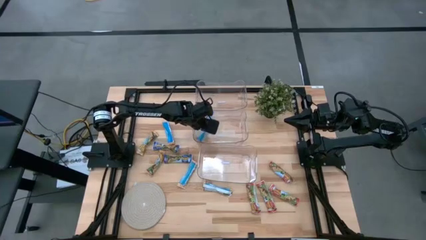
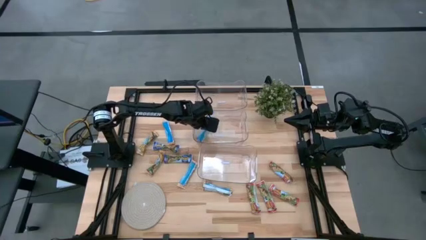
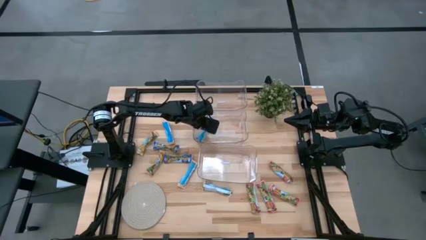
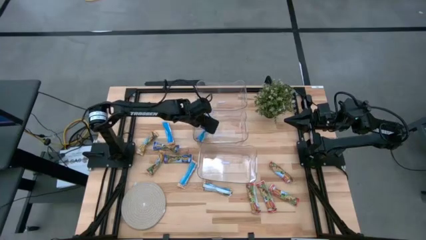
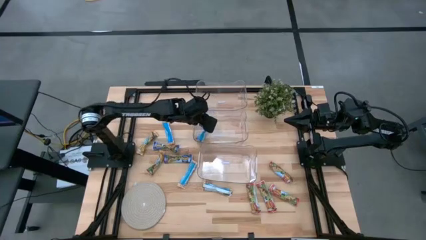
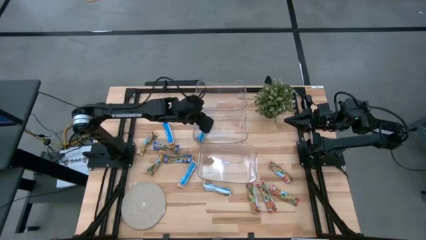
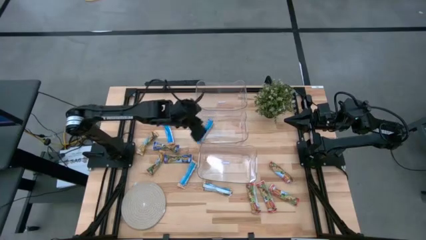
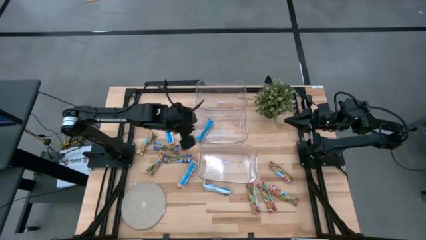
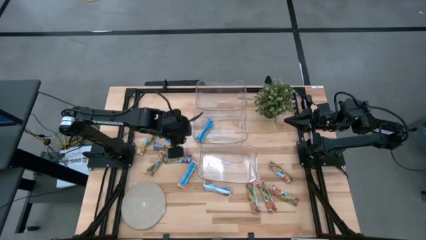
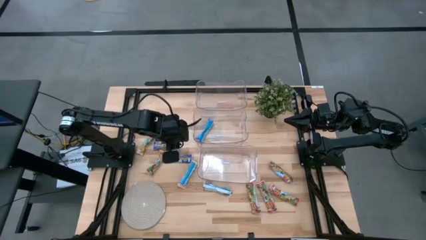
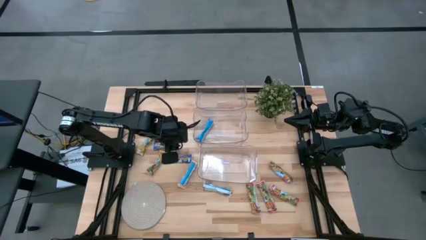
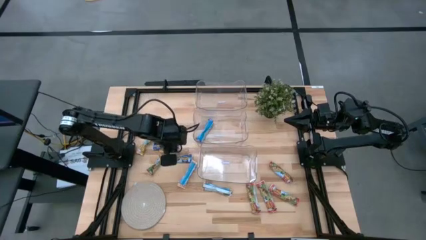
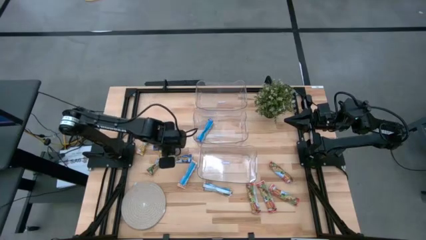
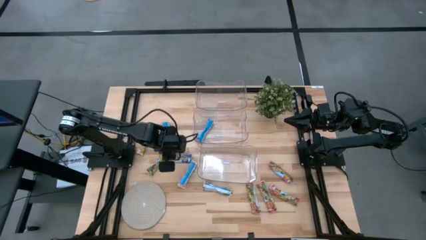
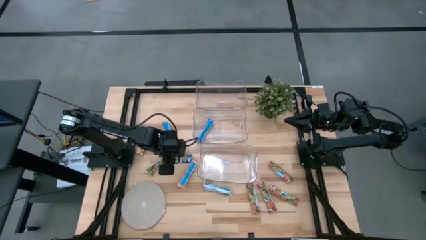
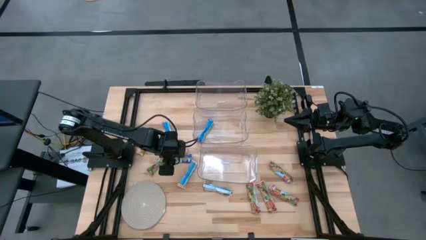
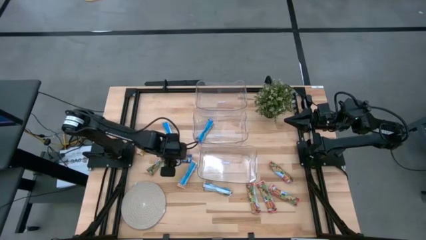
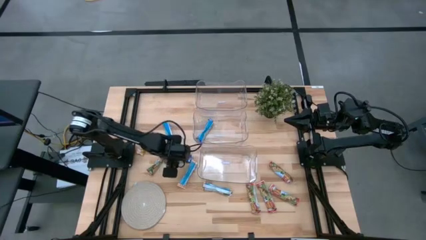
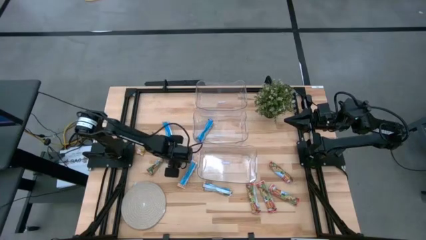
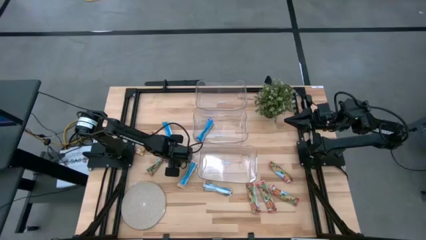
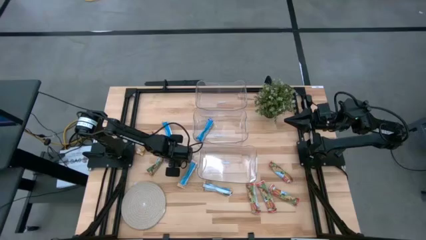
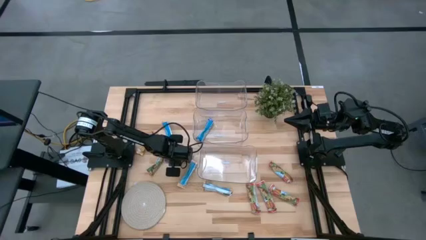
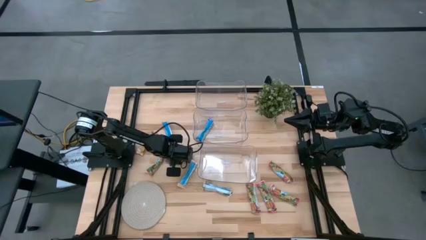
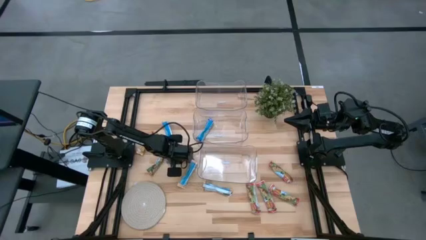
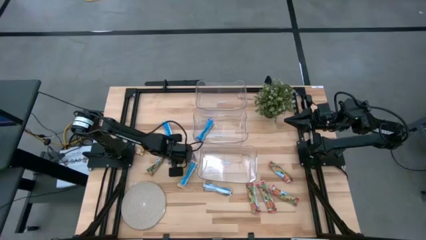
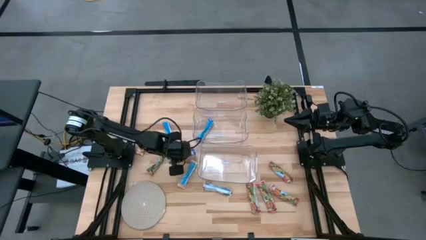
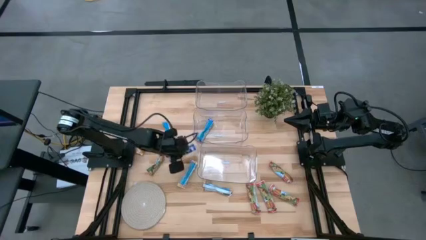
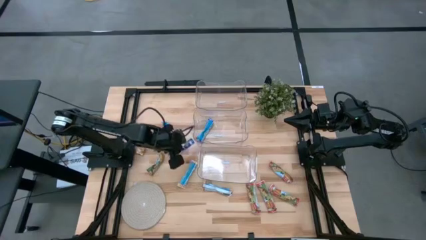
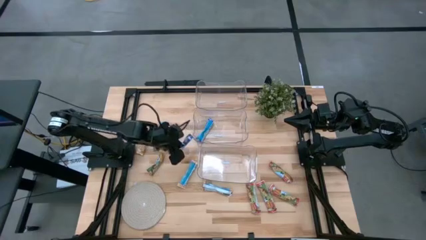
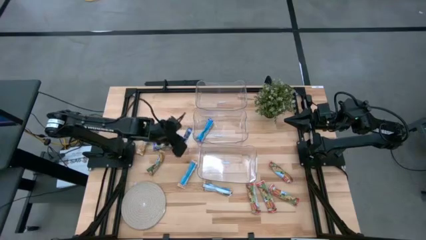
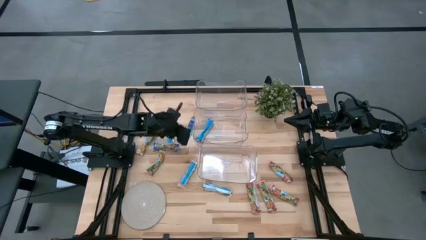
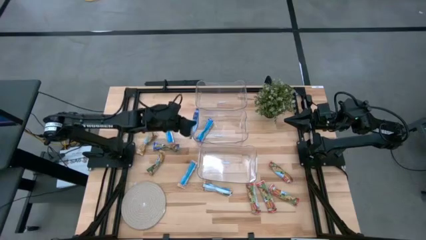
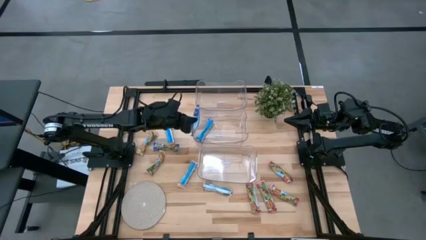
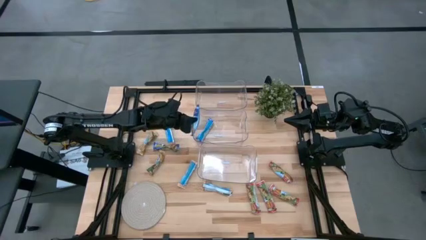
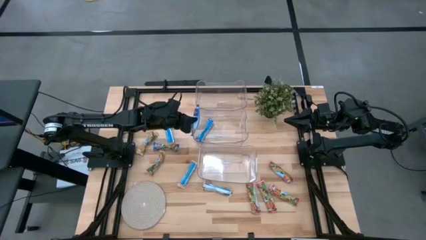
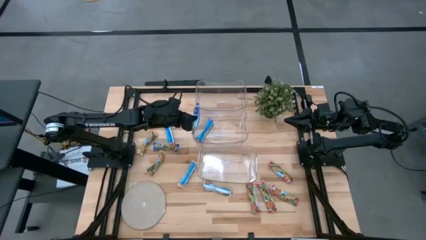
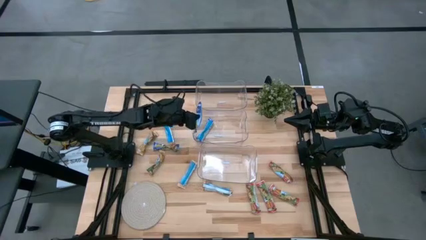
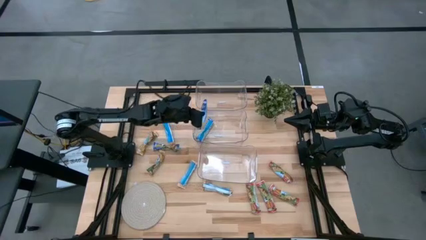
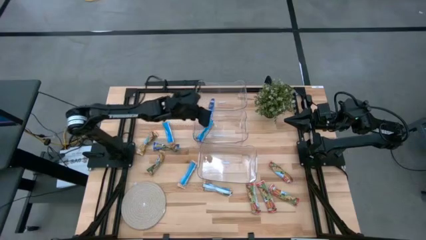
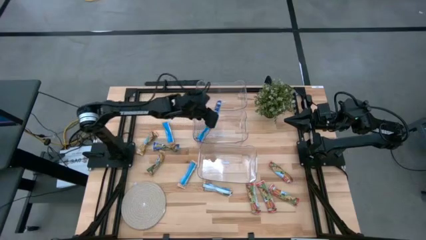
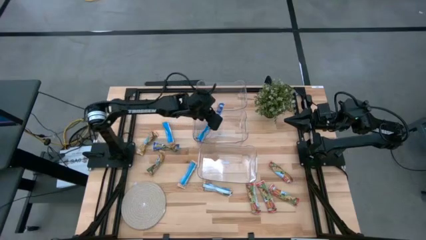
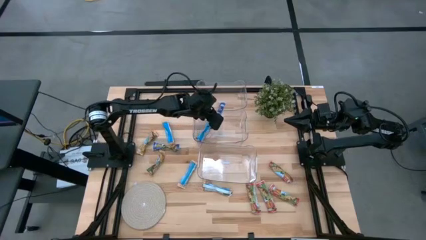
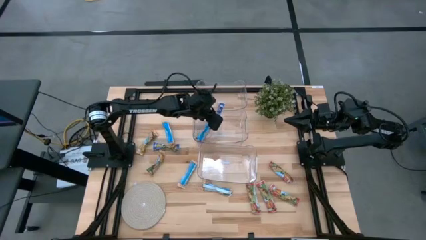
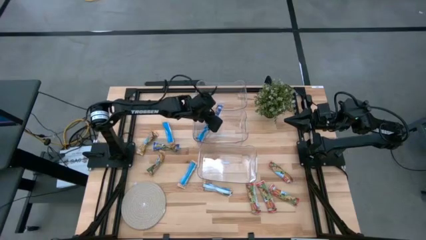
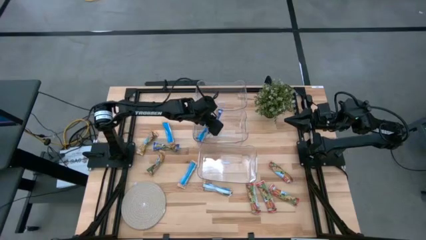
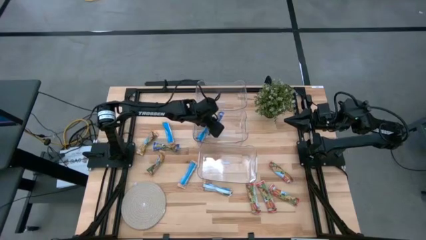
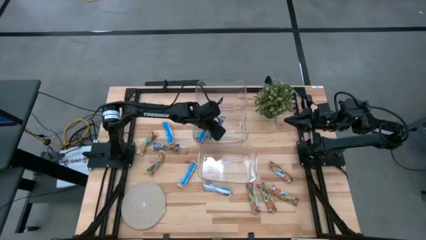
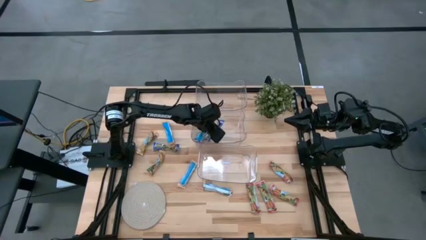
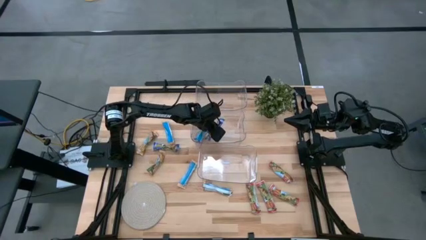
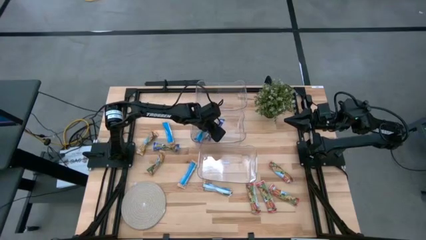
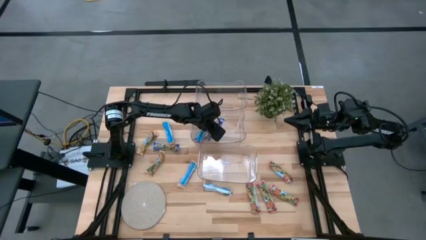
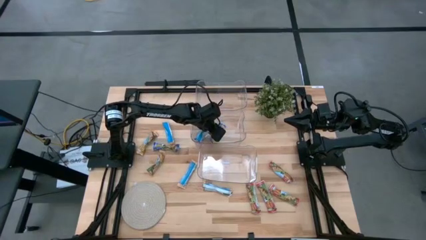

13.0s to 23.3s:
Task: Pick and place Granola Bars by type
Put the blue granola bar into the middle transparent bin

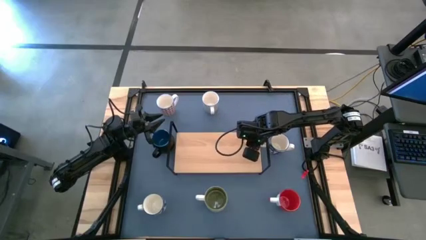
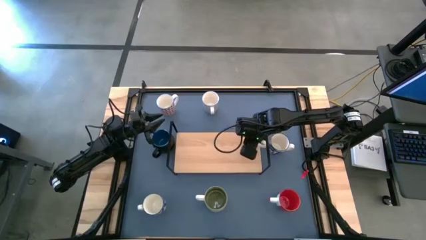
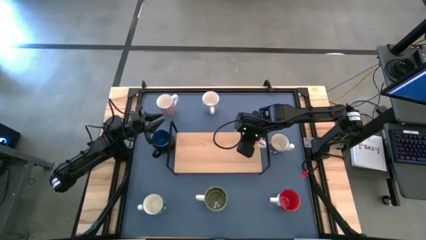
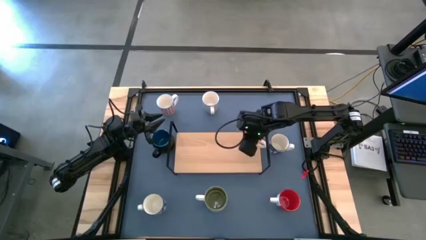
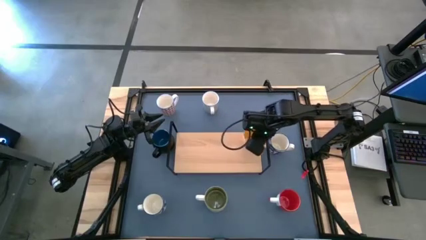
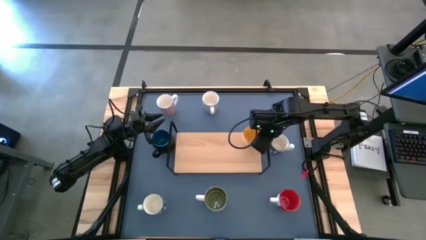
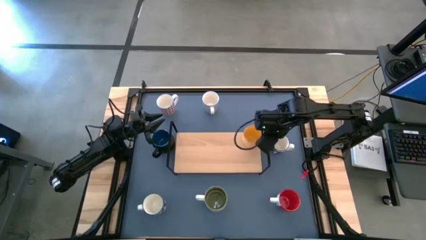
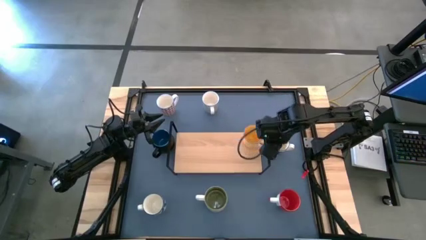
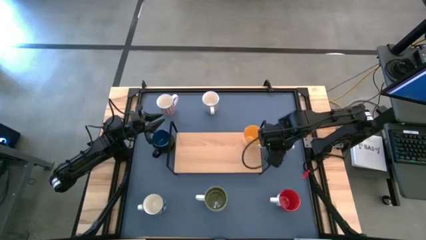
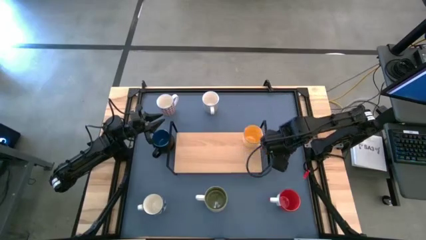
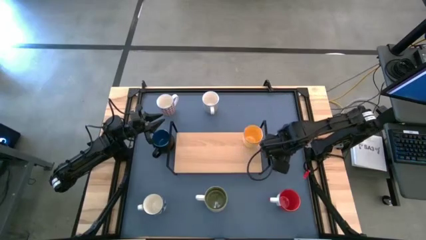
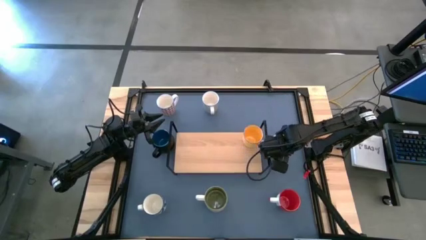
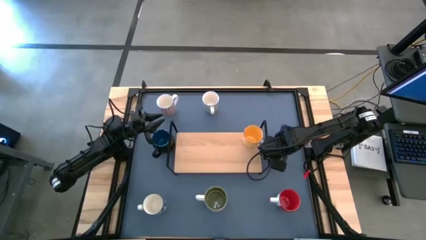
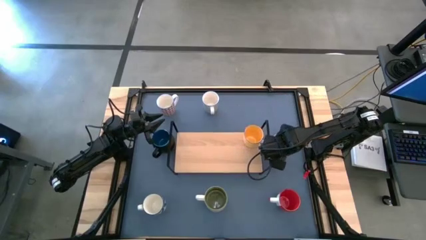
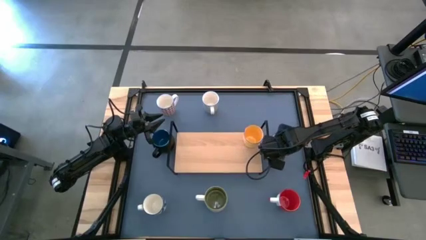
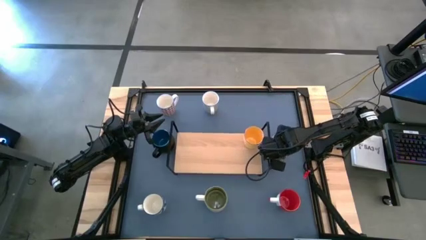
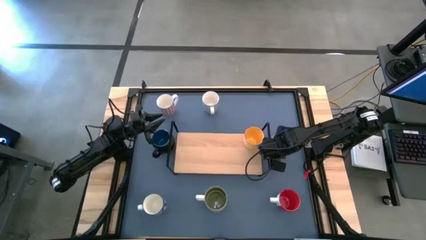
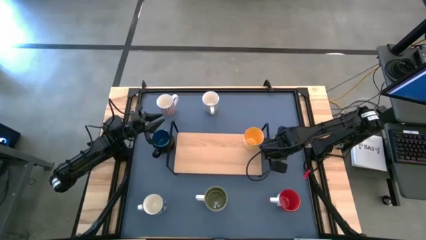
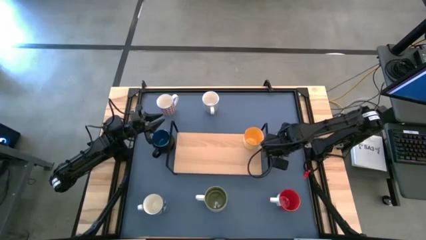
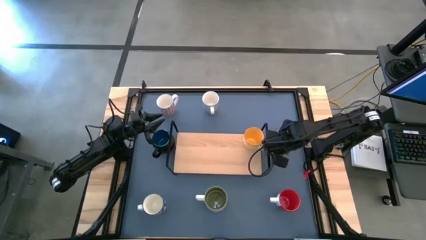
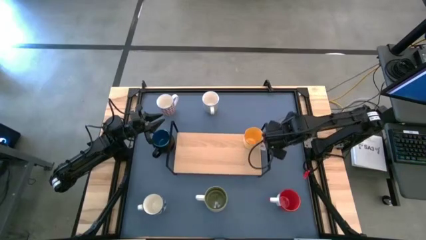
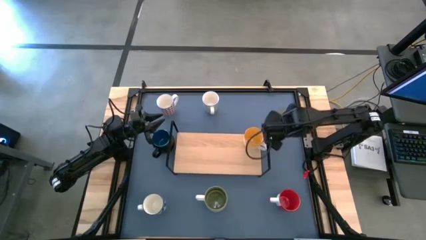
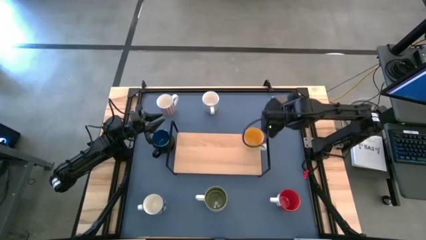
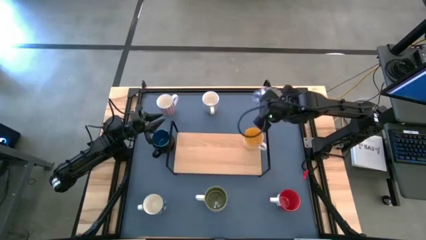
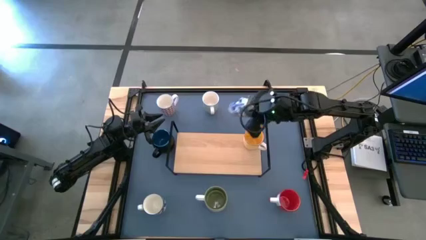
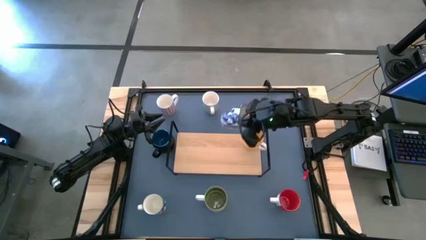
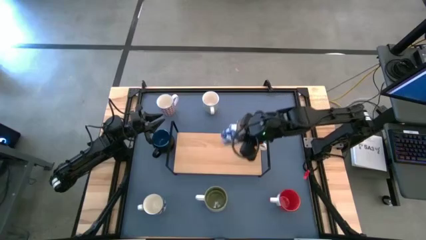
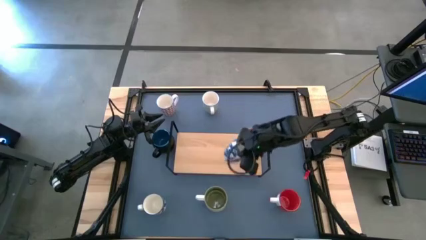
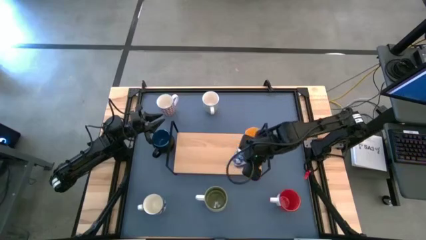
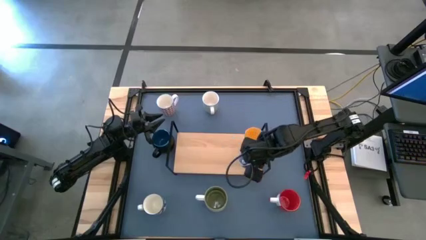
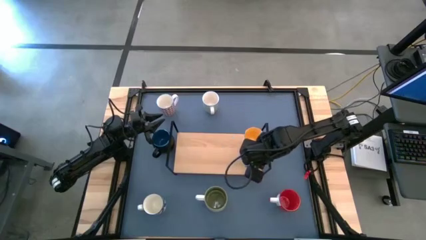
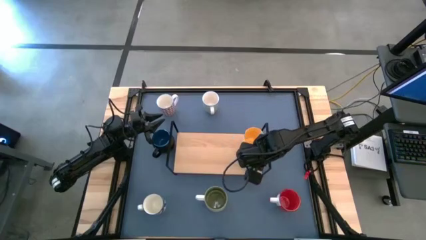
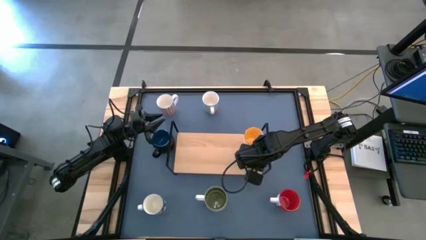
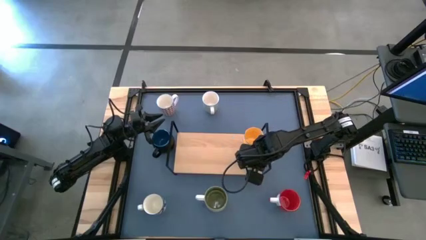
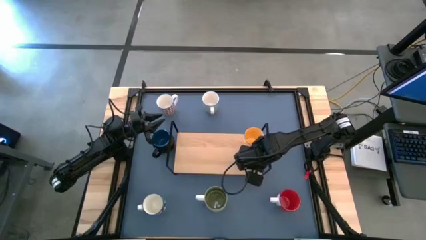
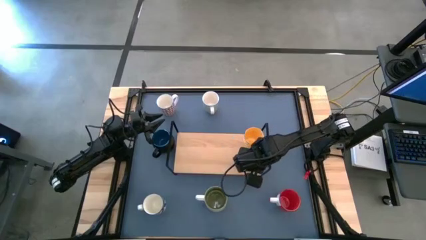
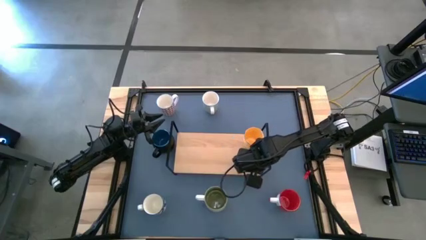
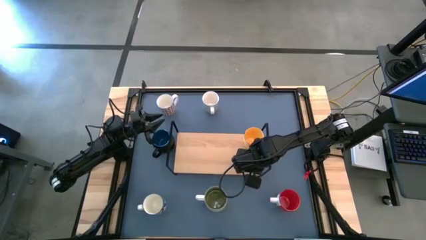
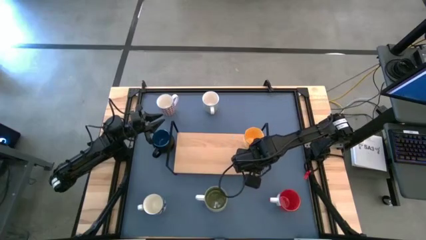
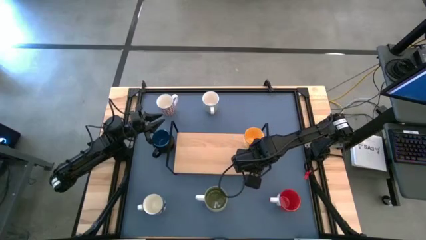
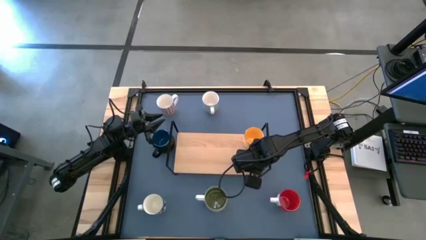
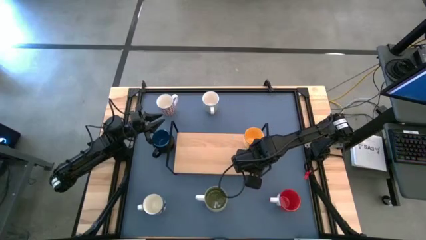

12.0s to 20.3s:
Task: Place coffee mugs
Put the purple mug on the shelf
